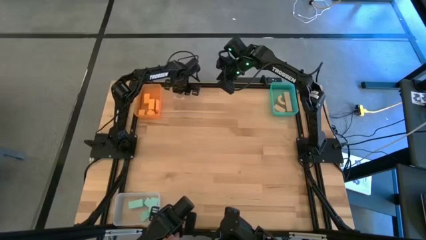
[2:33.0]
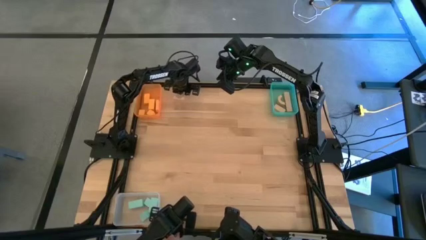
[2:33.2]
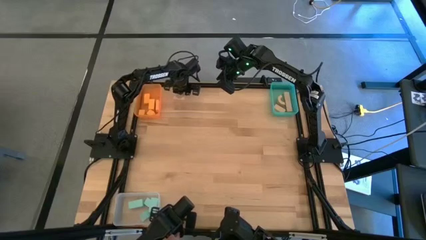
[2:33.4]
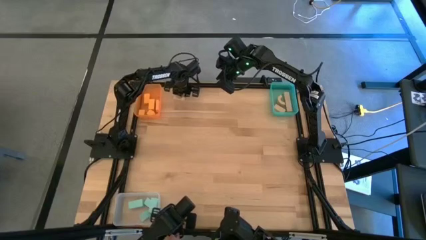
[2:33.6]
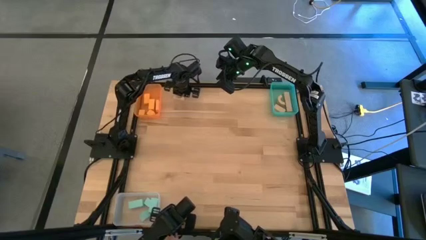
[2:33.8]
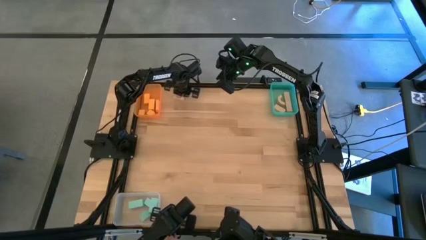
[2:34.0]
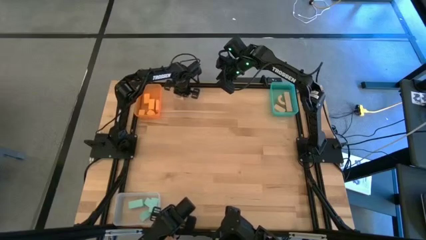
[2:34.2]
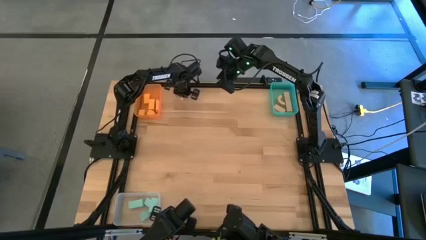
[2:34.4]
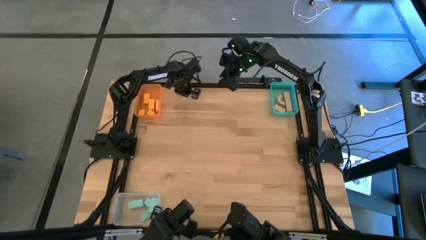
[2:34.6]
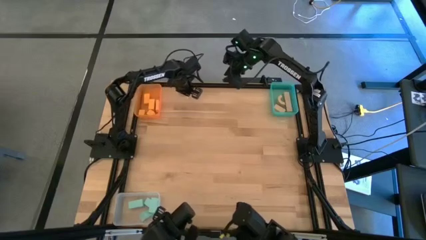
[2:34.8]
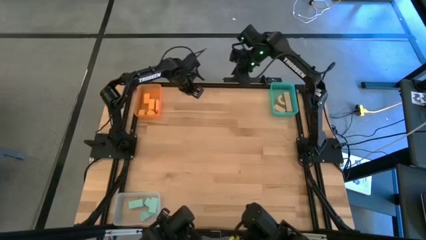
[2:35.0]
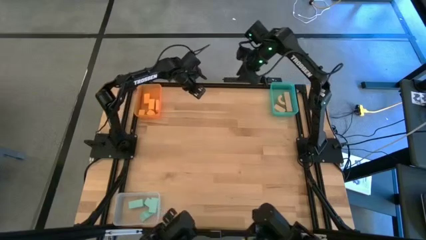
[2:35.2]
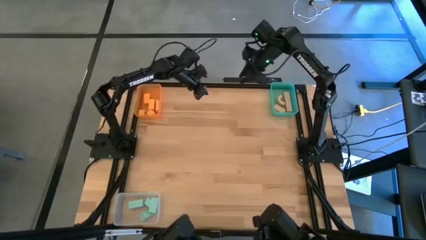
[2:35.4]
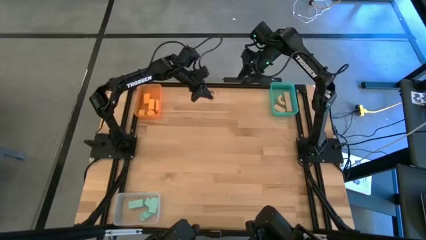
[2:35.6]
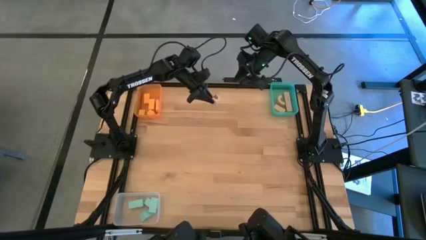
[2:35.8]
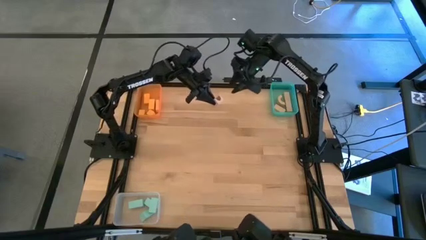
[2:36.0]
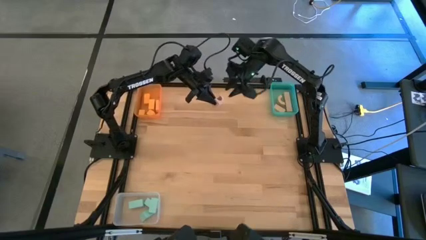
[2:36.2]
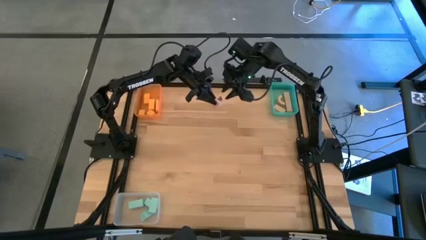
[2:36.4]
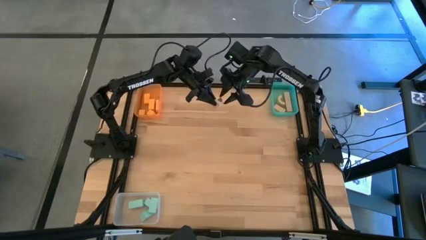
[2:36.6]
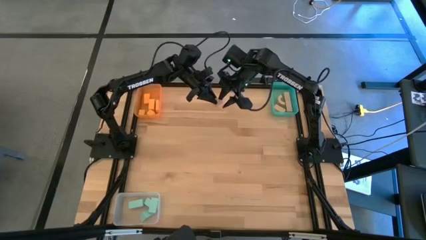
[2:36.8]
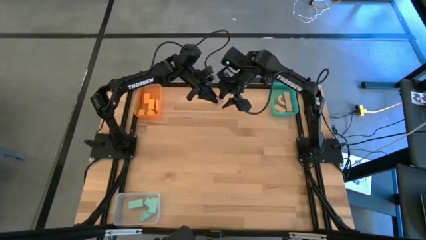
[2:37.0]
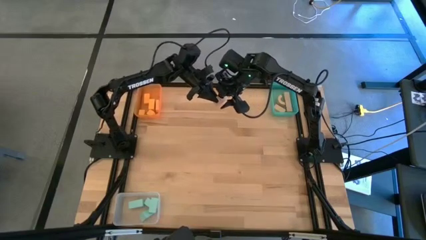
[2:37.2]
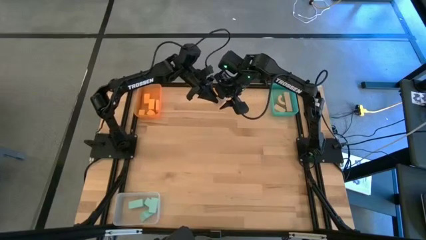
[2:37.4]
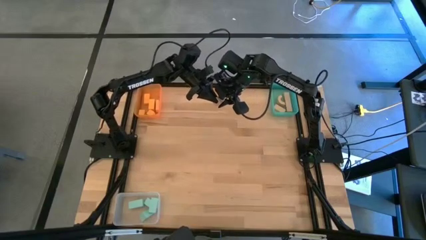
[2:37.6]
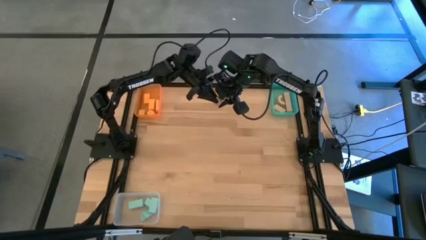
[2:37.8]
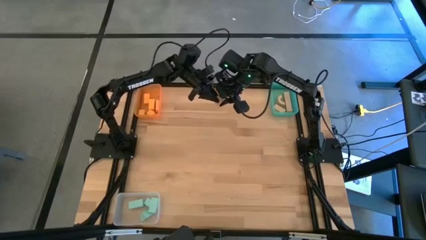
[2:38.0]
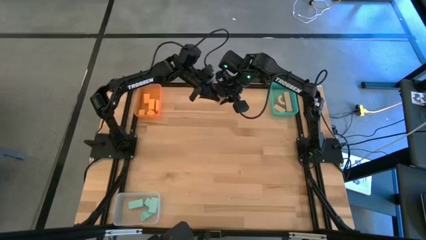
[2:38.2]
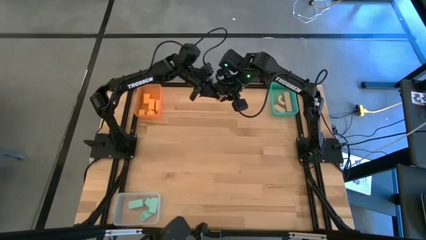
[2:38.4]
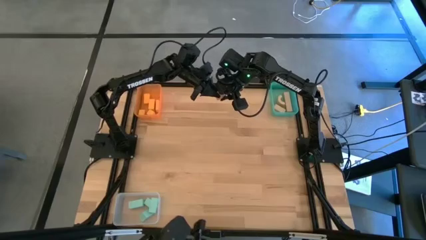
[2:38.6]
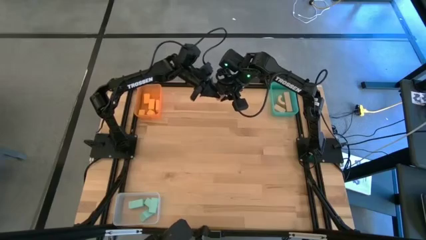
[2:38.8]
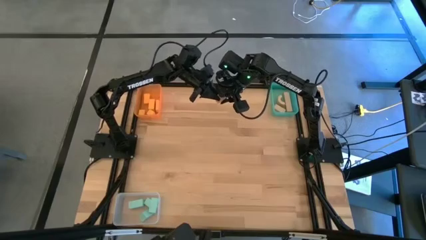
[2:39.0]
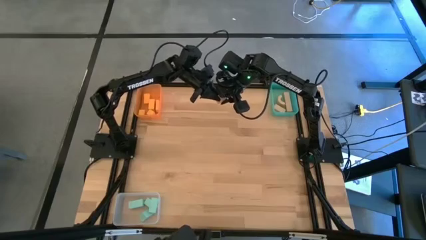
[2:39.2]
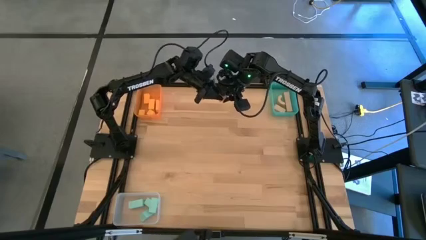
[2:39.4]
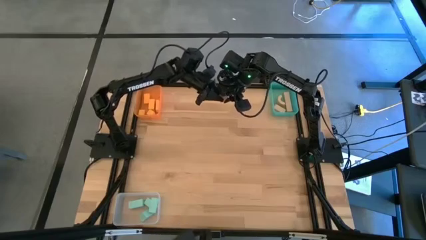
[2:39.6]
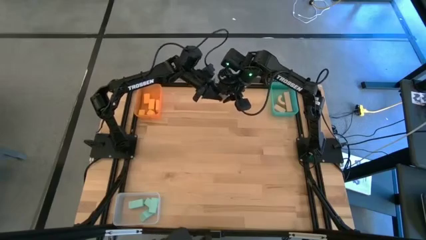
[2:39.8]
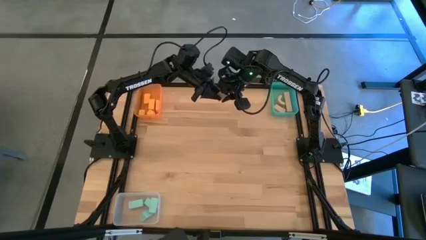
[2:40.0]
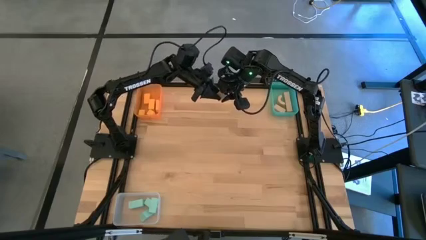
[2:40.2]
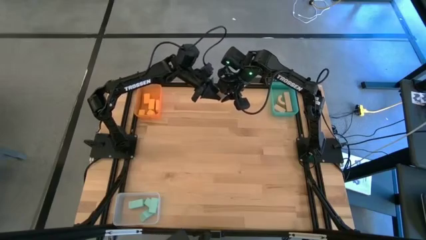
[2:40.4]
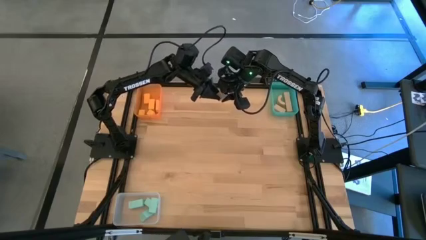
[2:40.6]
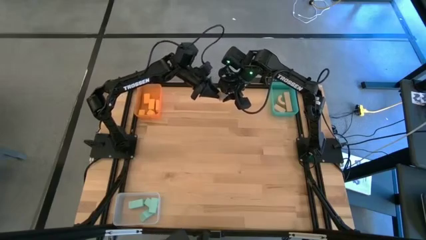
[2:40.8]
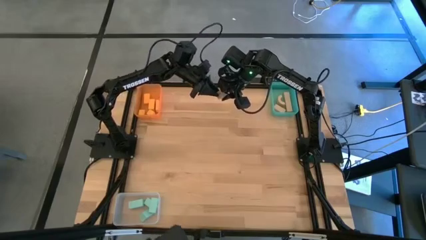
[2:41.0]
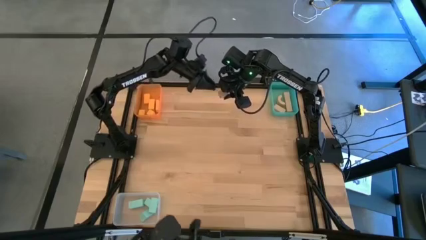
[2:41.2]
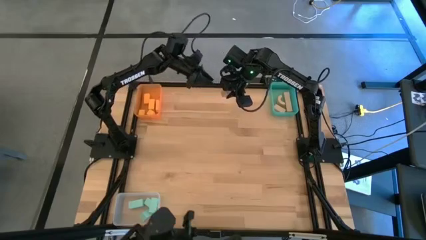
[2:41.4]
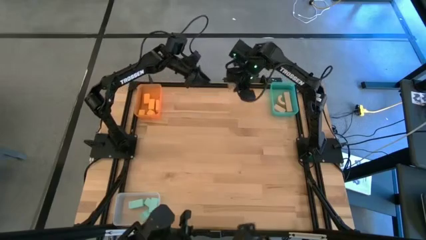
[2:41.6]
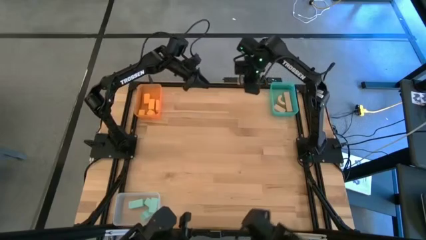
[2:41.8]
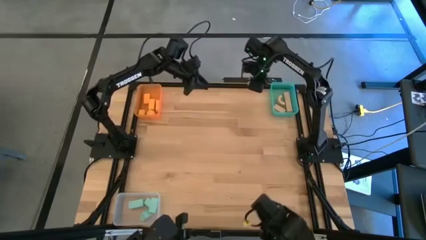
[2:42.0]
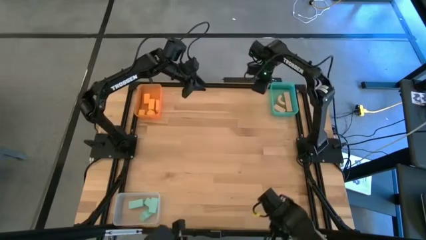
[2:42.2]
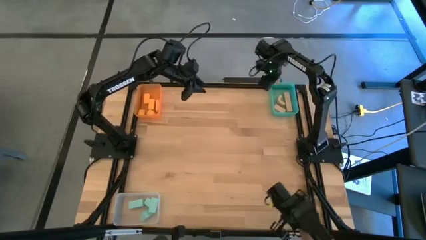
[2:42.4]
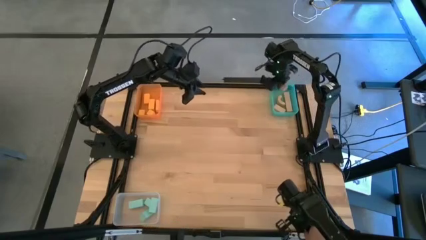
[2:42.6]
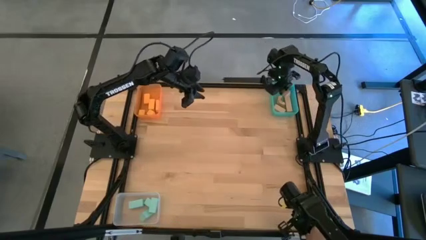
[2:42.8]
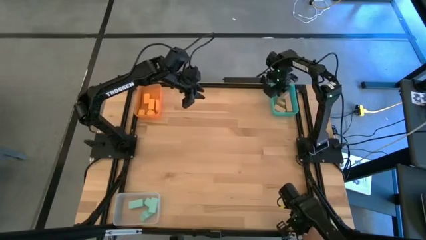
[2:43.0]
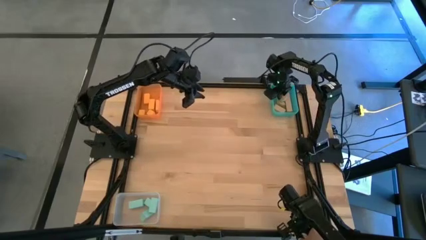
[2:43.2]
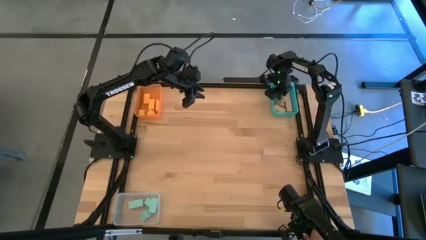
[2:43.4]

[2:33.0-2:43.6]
Task: Sort & place blocks by color
Put the brown block into the blue bin

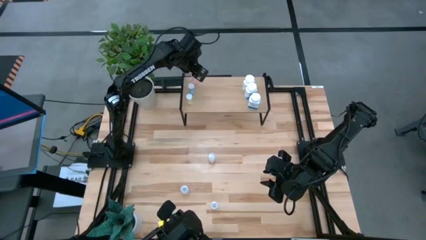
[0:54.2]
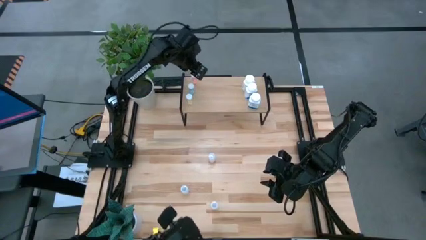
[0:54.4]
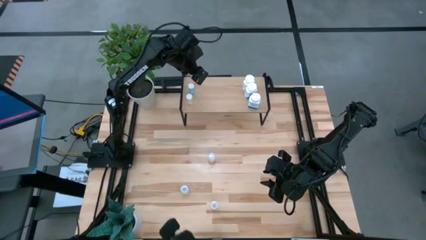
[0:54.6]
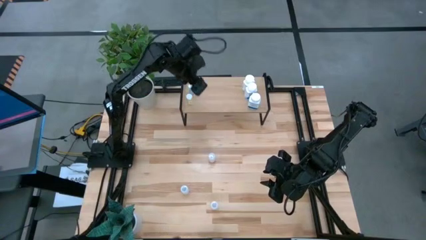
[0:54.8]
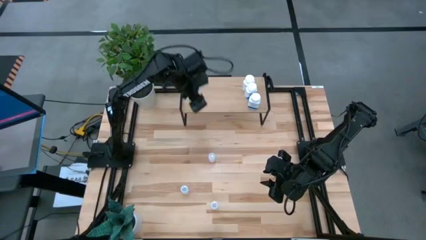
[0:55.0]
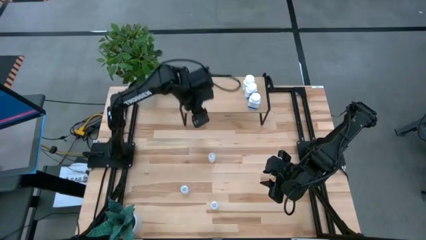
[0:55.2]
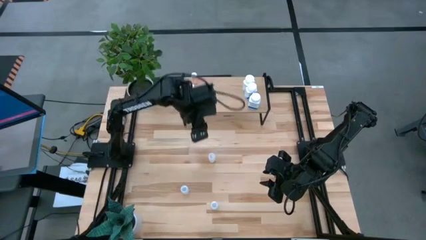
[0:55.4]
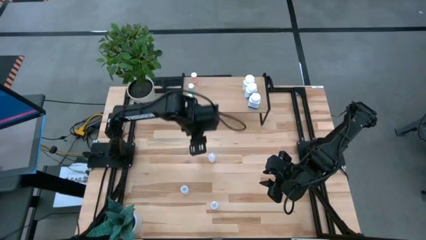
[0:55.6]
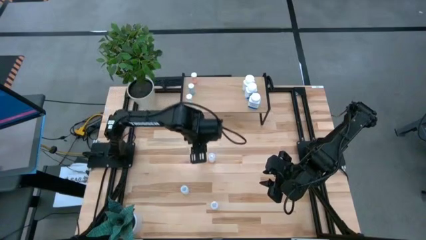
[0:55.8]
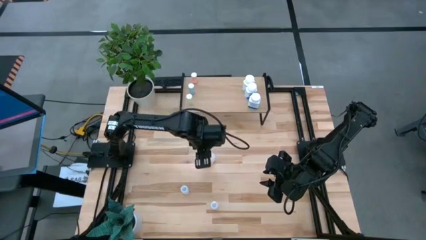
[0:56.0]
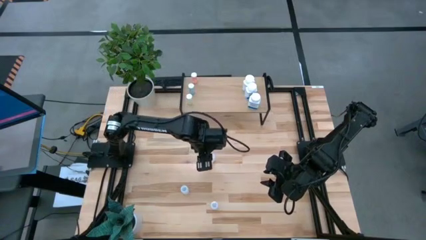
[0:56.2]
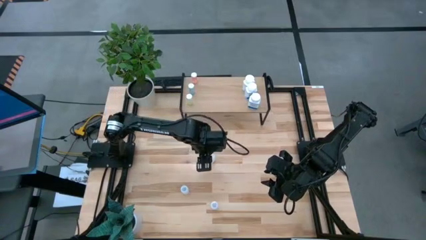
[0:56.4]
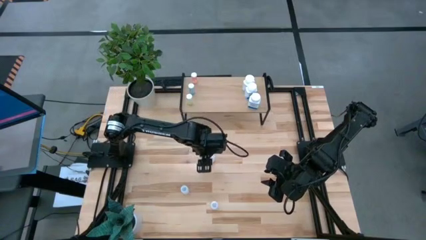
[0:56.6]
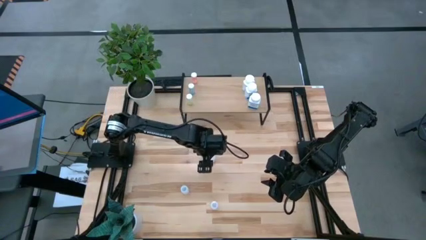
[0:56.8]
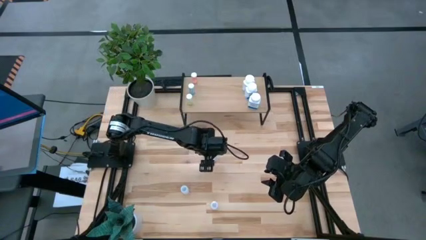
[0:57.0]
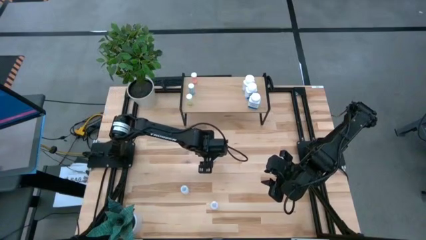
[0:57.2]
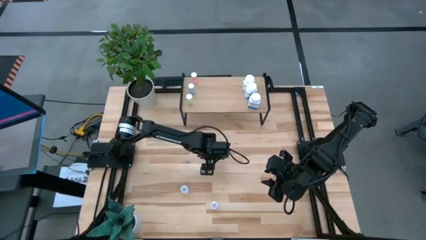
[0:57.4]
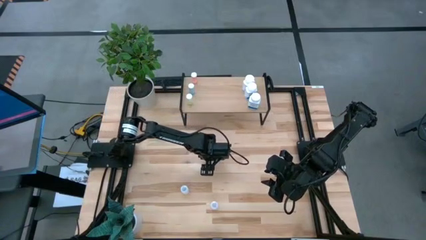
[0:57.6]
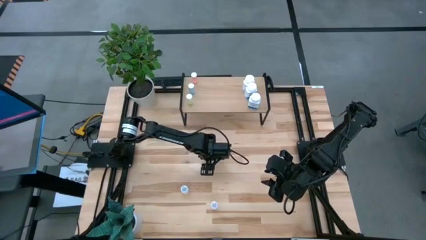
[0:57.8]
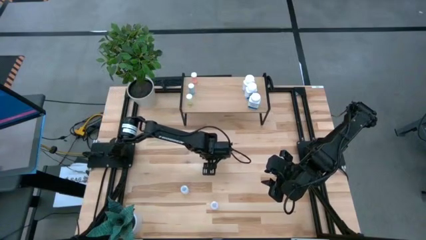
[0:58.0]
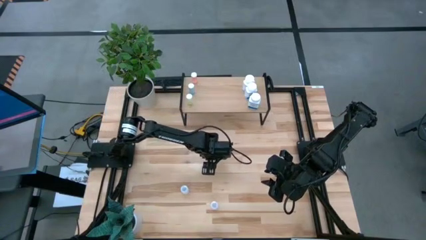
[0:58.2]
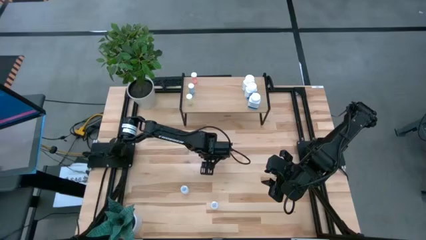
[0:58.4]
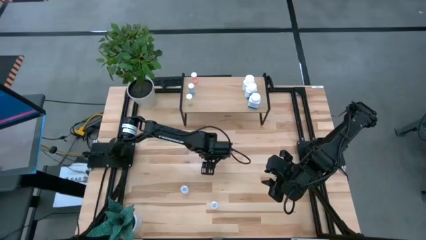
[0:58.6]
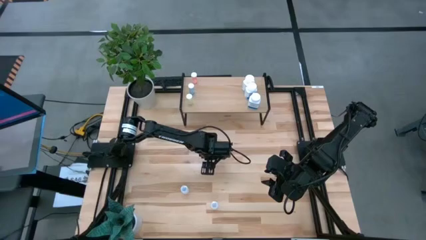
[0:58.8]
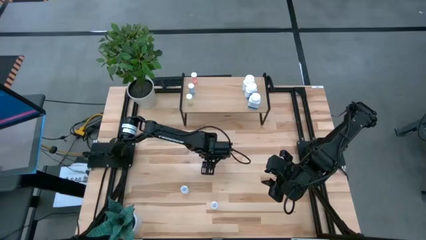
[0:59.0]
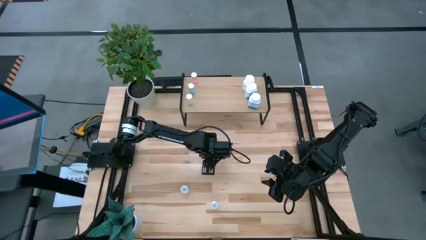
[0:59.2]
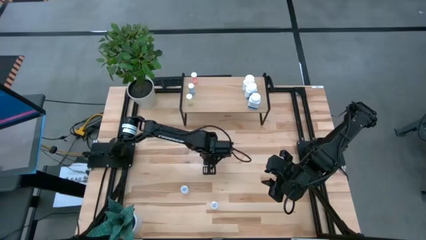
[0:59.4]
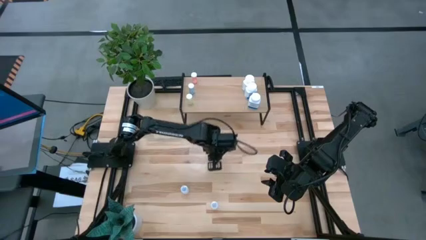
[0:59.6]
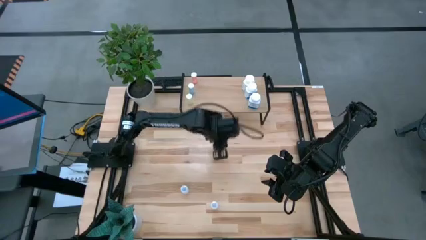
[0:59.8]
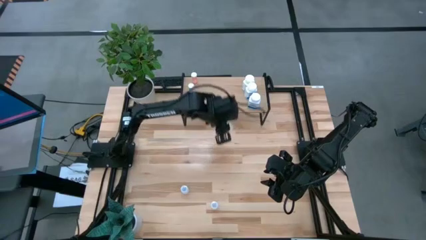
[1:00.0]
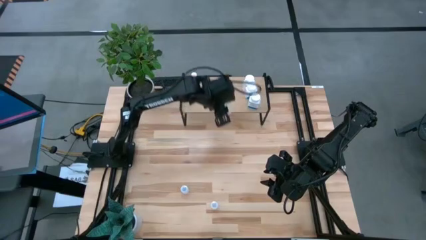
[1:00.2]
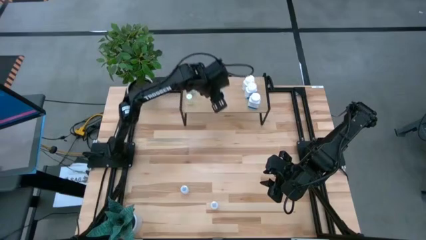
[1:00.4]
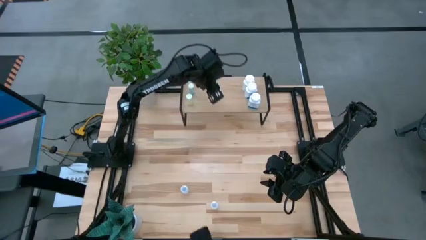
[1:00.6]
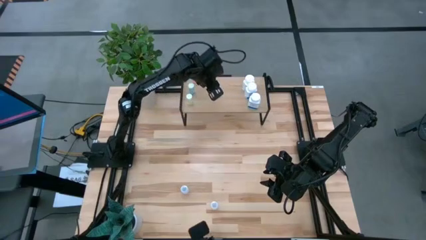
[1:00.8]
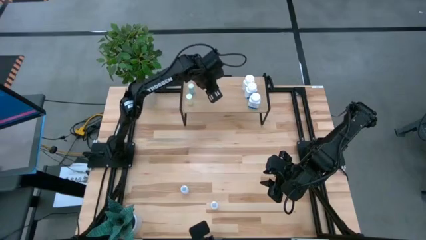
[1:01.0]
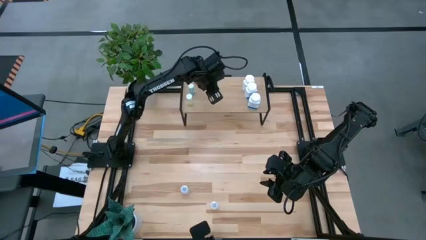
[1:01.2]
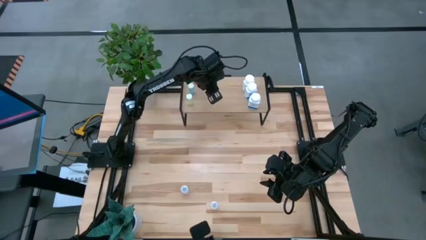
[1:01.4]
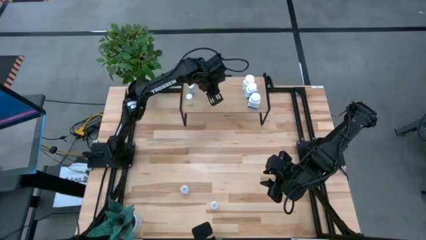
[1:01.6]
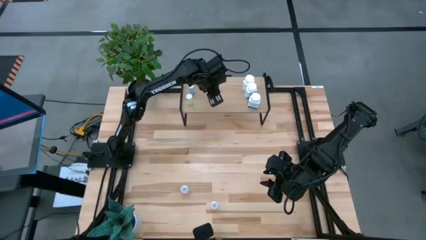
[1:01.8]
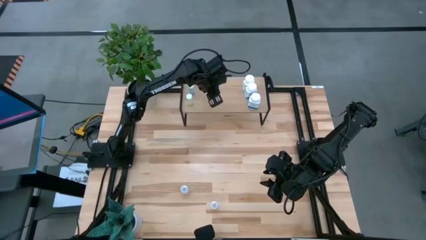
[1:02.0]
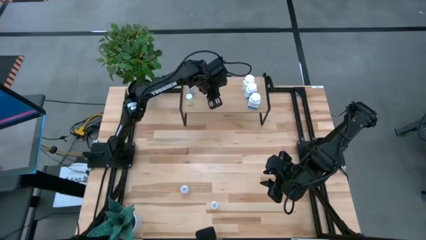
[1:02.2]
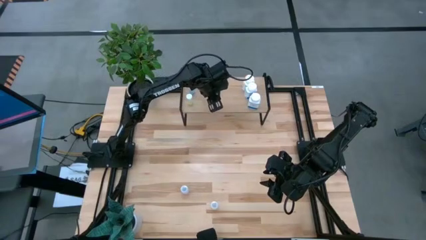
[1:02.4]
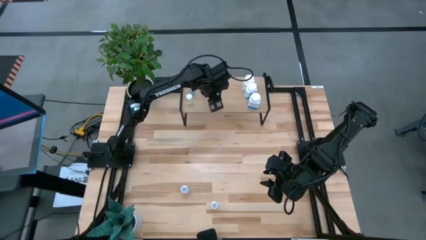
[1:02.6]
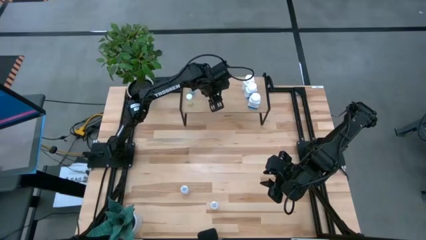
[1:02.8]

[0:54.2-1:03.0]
Task: Pick and place medicine bottles onto shelf by color
Put the top right transparent pill bottle on the shelf
